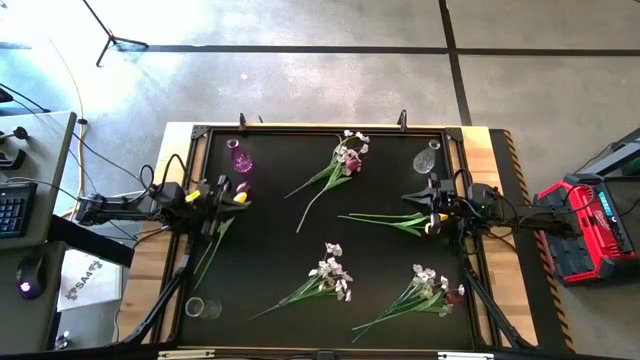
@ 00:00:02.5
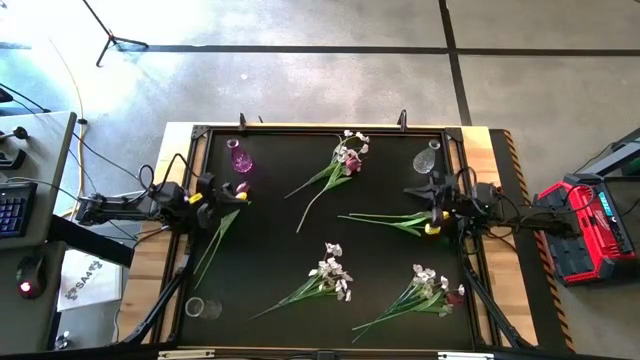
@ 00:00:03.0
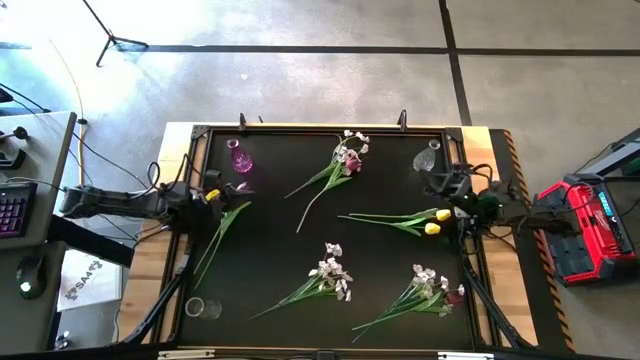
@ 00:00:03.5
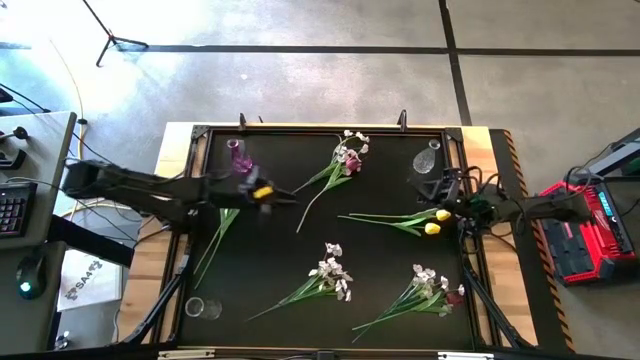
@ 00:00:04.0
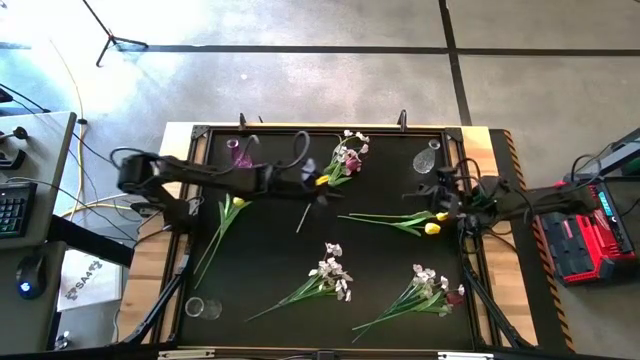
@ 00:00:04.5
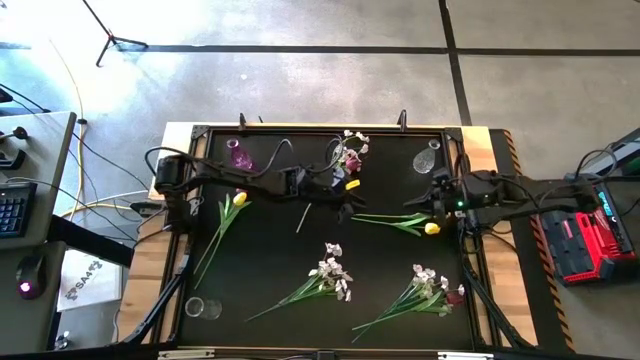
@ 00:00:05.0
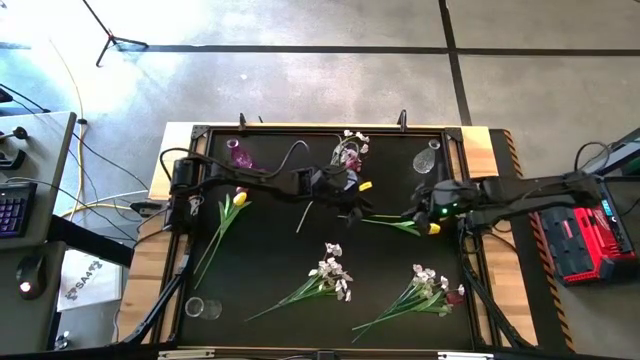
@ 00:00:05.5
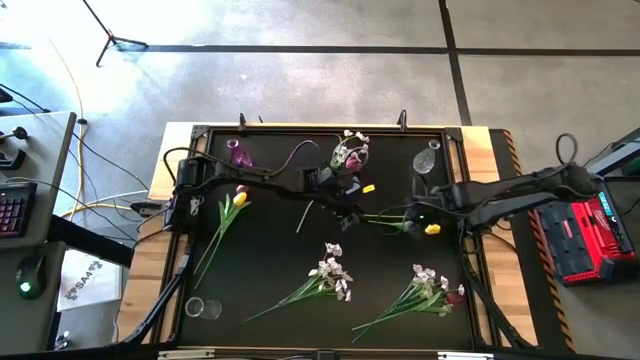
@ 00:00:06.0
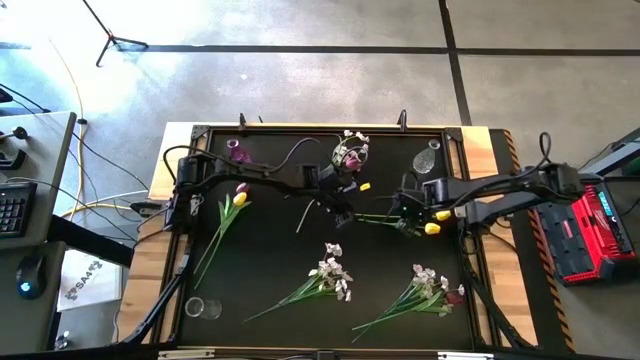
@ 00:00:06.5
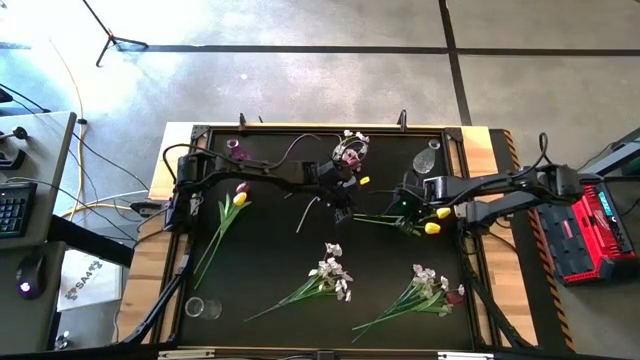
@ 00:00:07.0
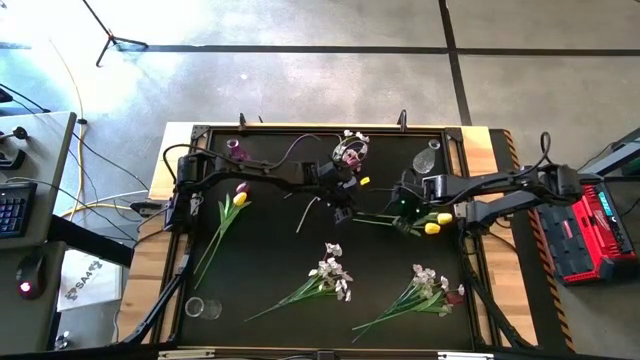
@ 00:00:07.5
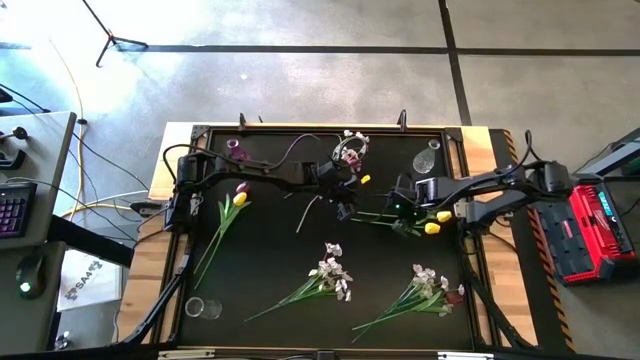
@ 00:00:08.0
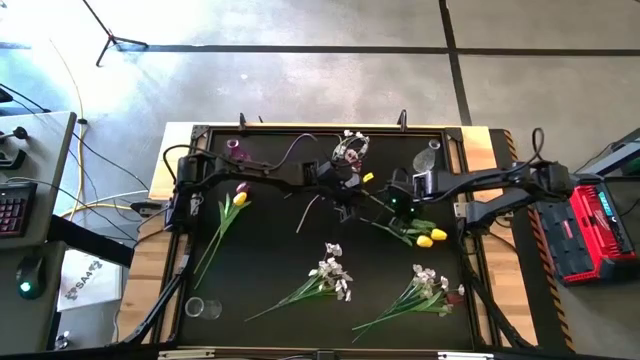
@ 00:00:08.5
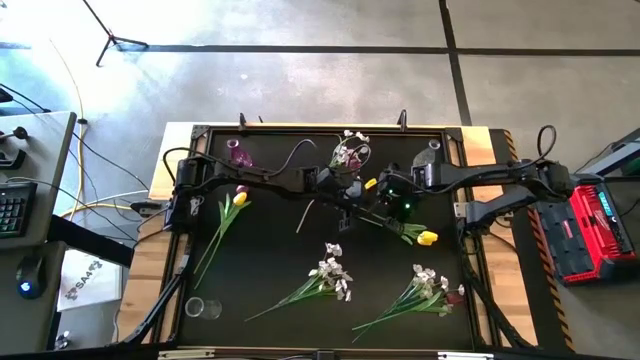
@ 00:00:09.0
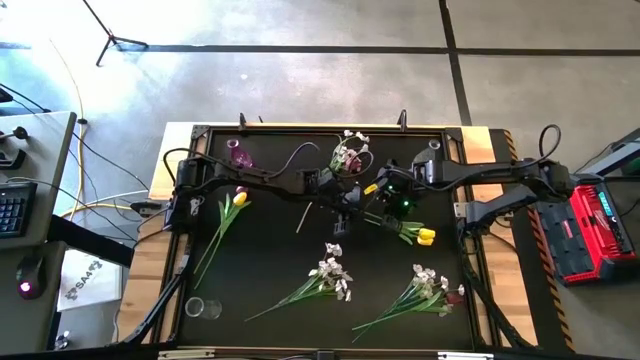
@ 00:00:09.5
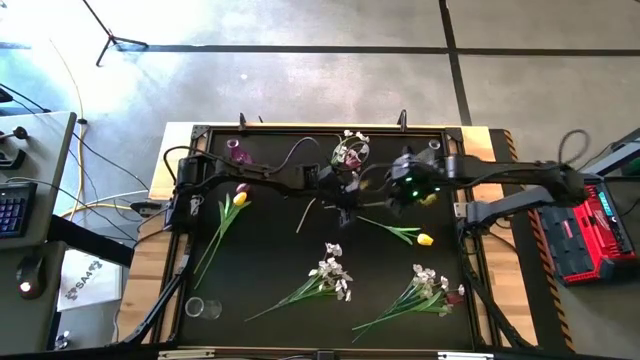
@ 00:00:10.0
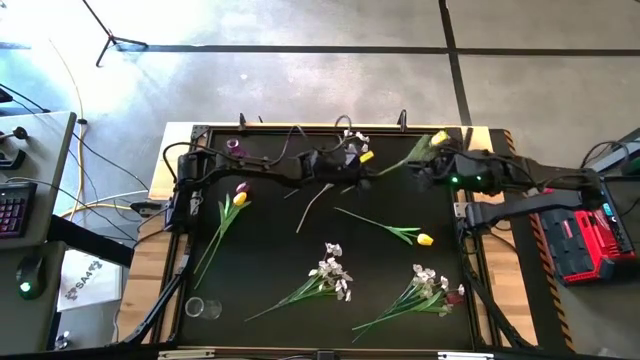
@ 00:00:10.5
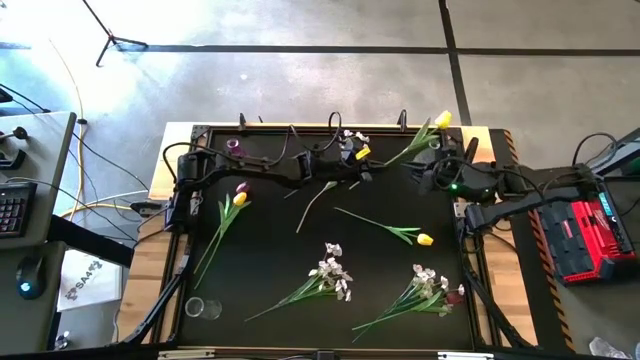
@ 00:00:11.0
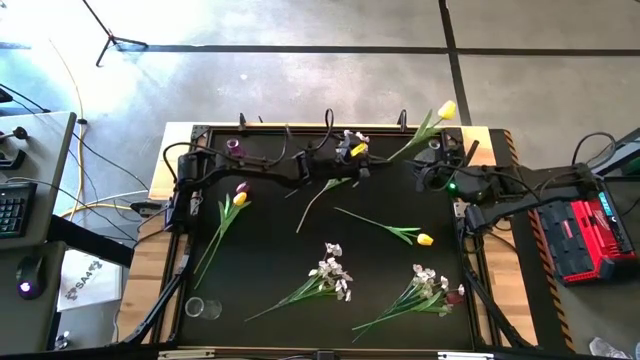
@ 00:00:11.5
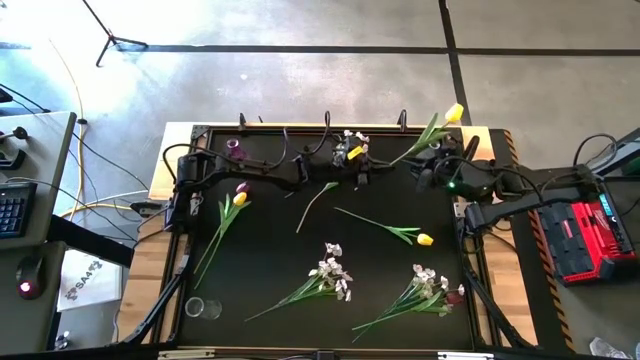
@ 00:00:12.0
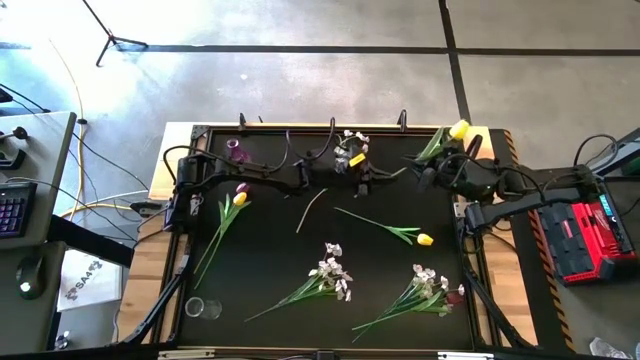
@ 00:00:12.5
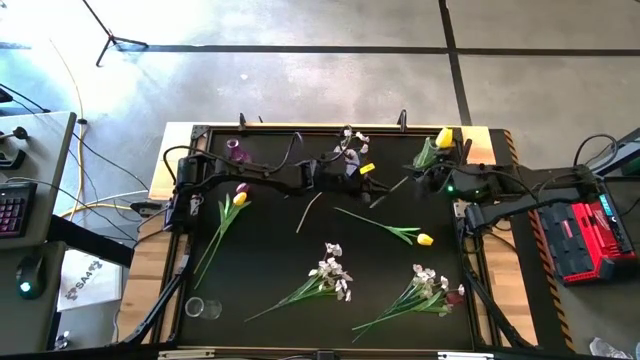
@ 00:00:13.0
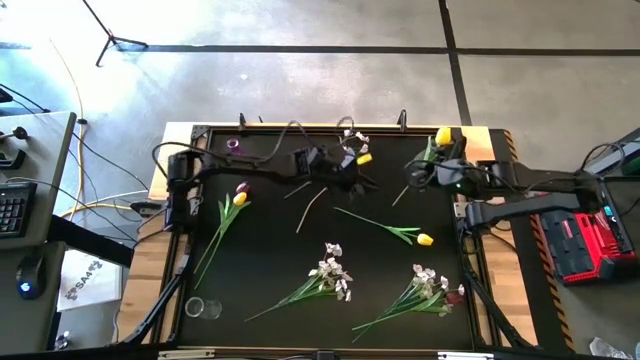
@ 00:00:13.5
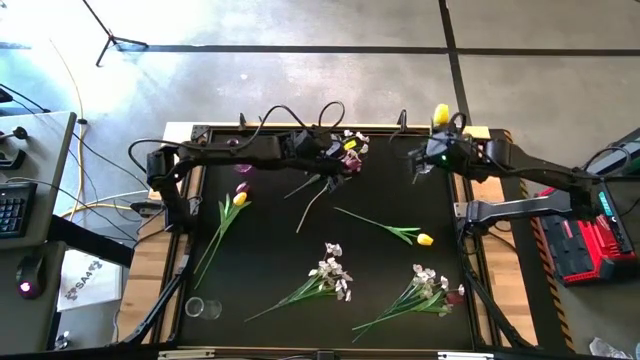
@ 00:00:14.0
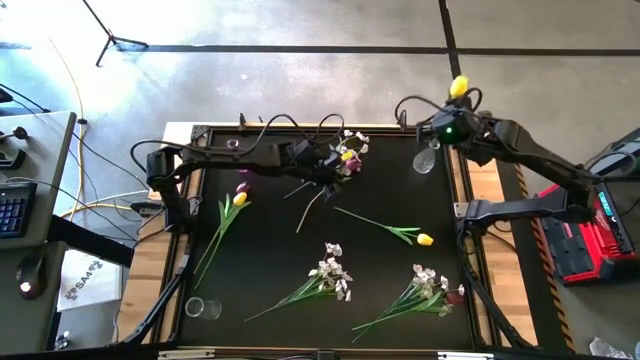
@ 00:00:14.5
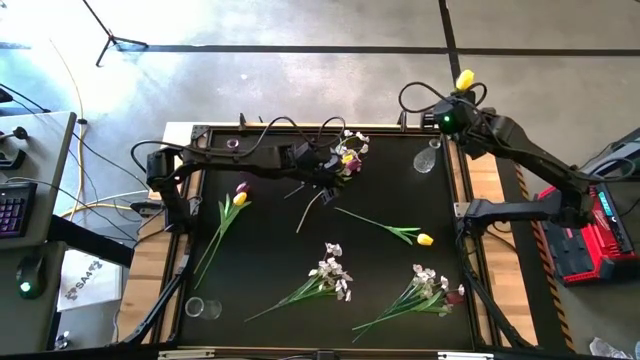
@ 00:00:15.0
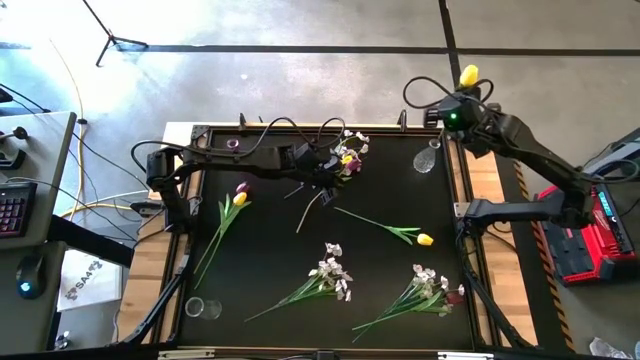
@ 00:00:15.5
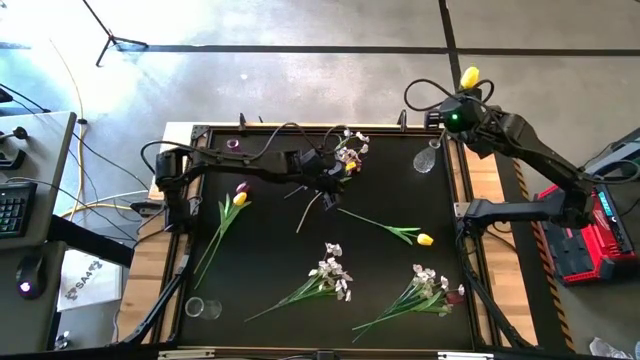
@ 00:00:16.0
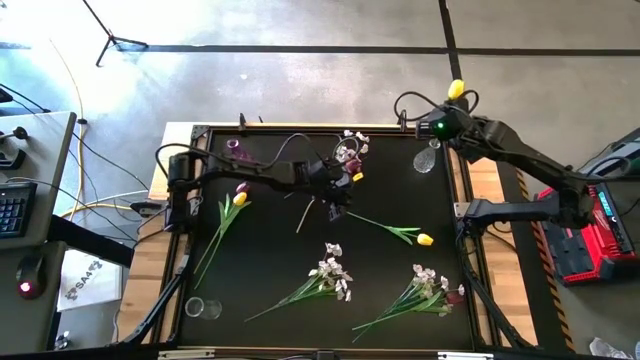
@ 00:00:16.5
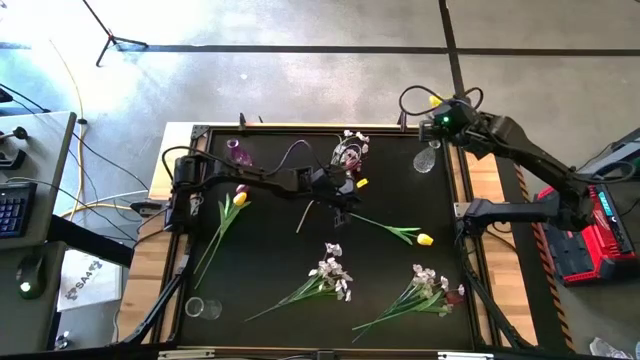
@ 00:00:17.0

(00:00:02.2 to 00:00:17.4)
Task: Sort flowers into vase by color
Put the top yellow tulip into the top transparent flower vase

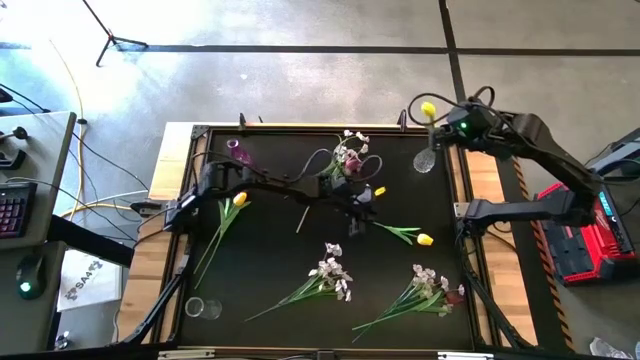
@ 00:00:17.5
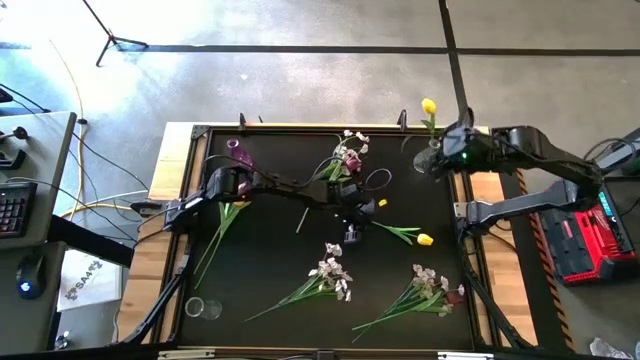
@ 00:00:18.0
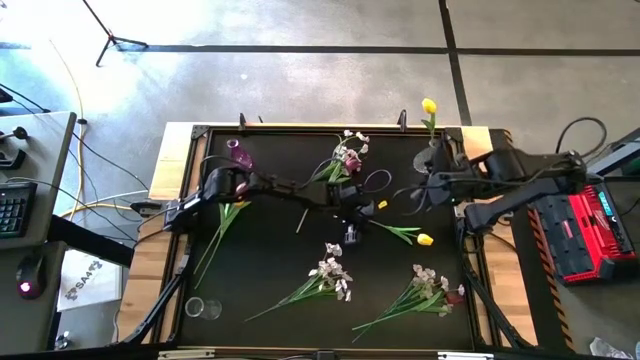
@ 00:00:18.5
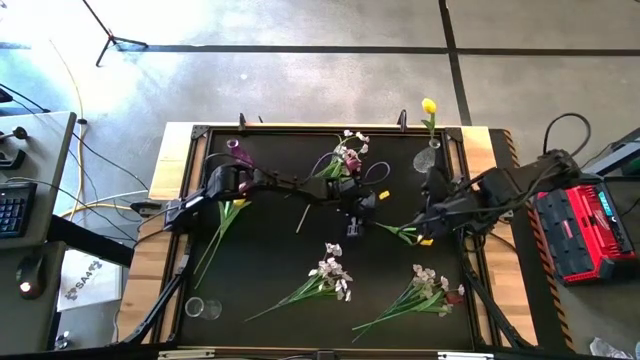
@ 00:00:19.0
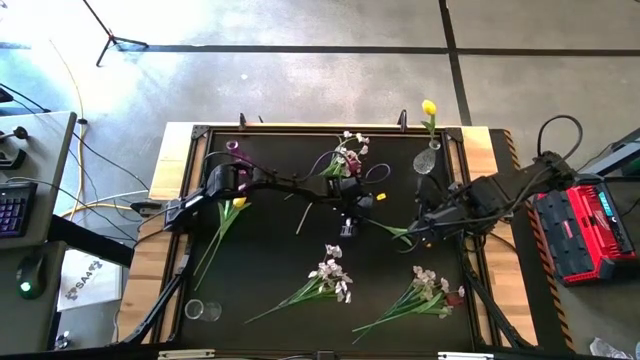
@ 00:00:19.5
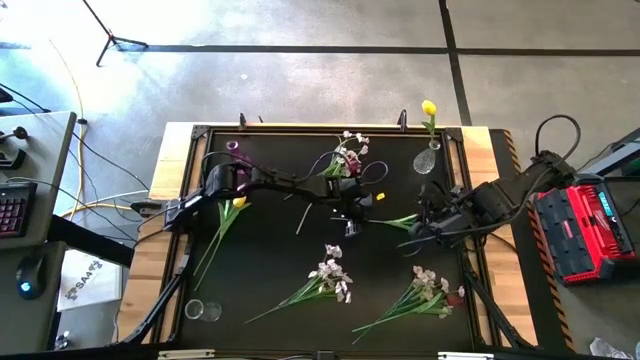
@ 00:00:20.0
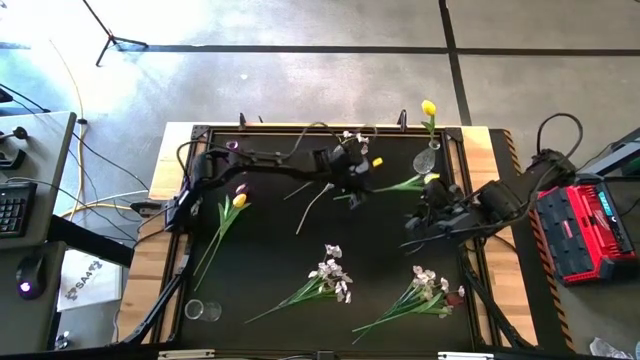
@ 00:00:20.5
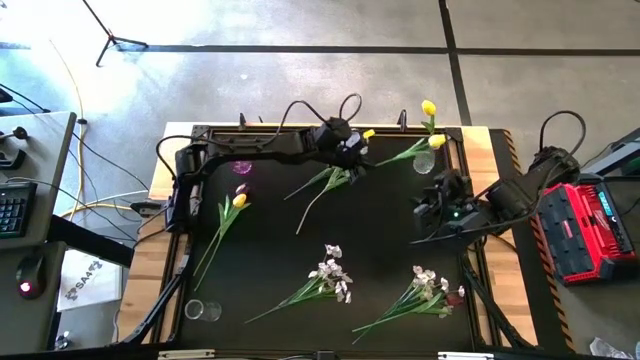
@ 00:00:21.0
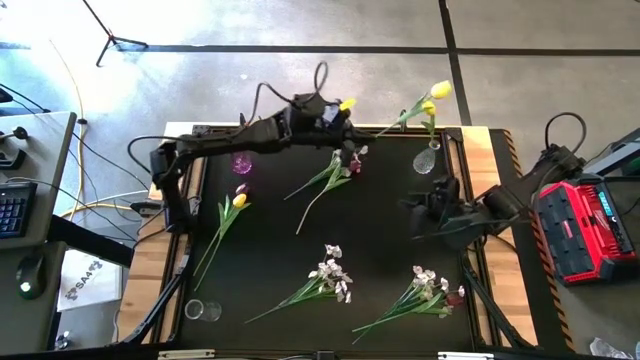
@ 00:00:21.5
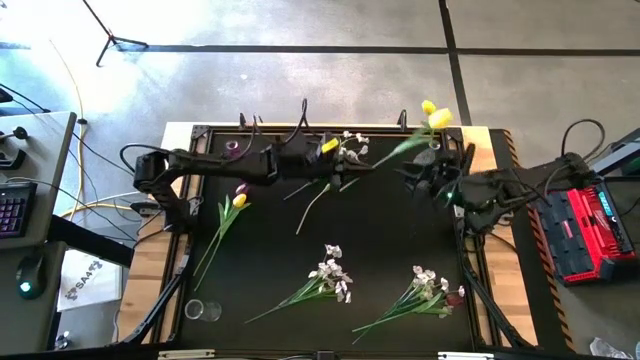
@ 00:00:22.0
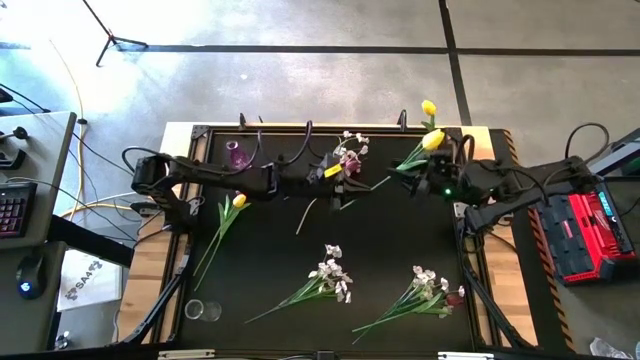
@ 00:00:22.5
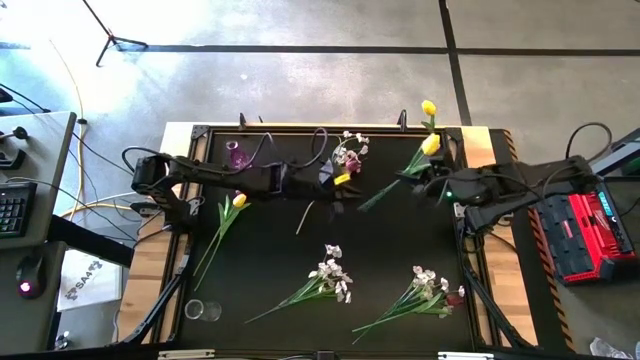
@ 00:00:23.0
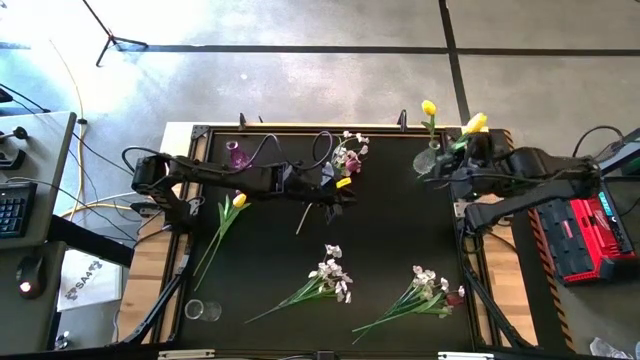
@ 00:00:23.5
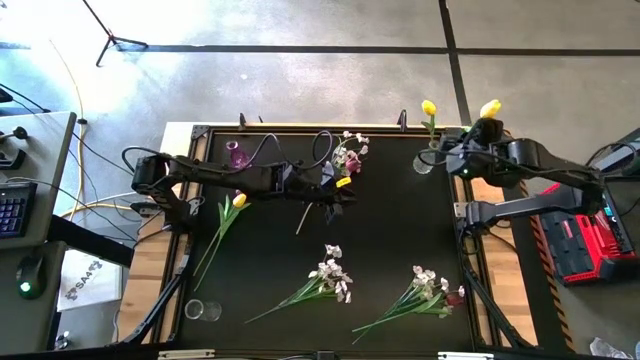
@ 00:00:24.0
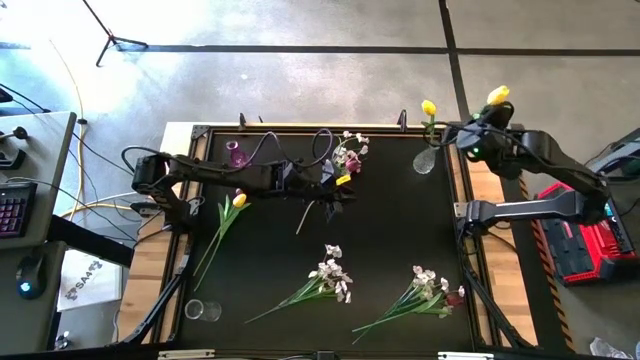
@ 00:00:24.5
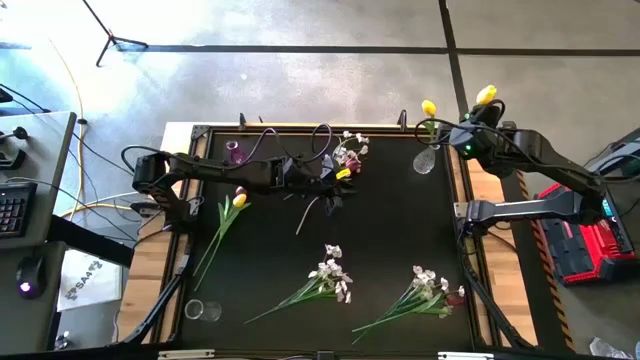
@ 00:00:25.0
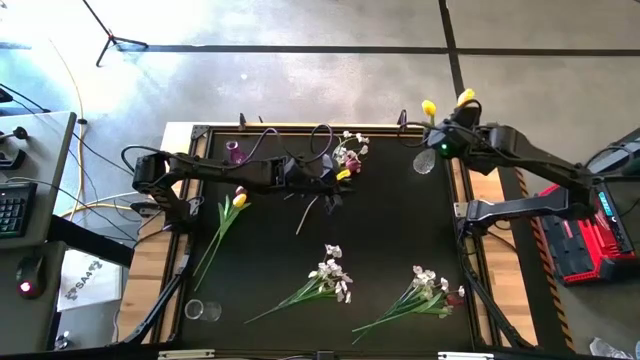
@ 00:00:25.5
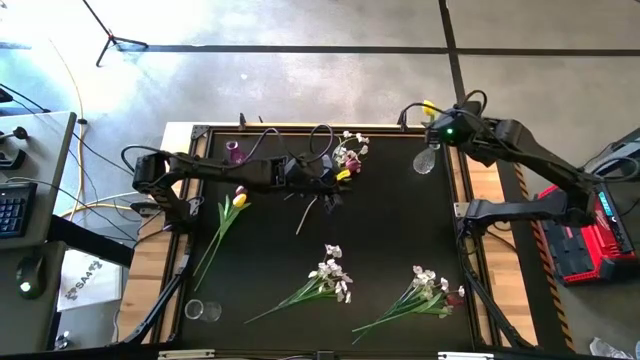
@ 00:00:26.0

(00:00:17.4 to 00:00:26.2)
Put the right yellow tulip into the top transparent flower vase
